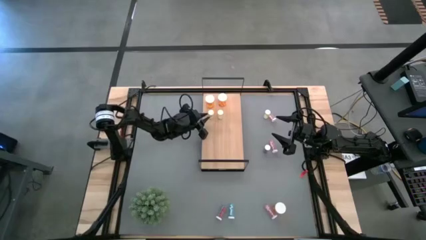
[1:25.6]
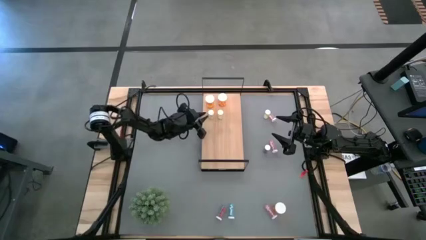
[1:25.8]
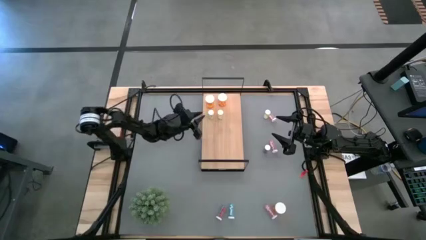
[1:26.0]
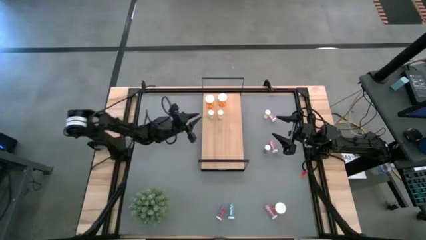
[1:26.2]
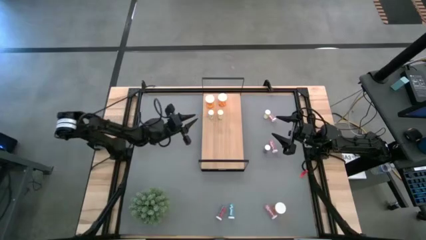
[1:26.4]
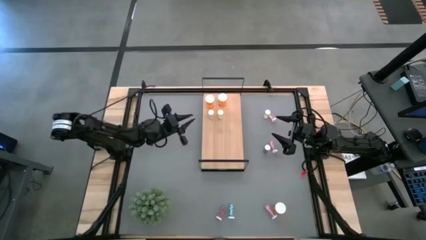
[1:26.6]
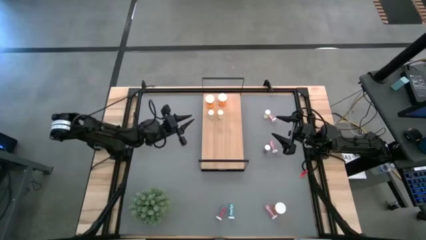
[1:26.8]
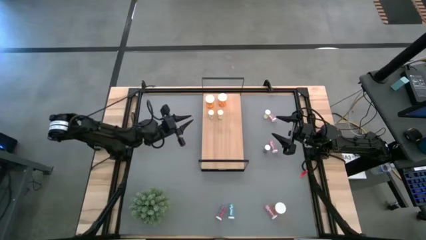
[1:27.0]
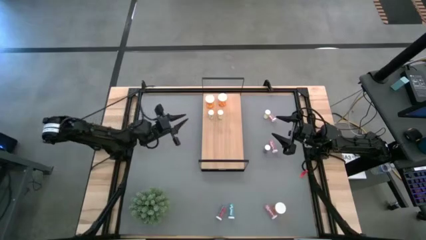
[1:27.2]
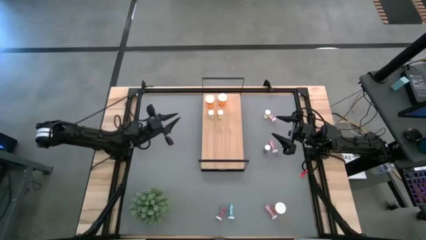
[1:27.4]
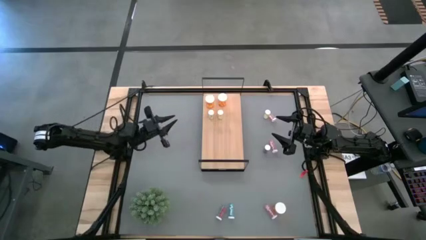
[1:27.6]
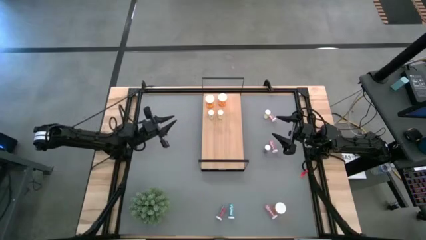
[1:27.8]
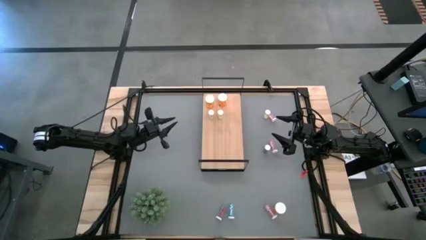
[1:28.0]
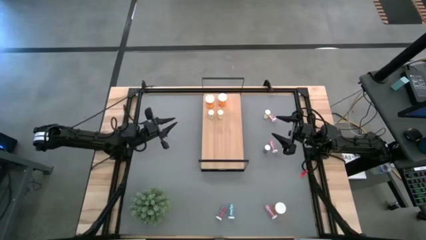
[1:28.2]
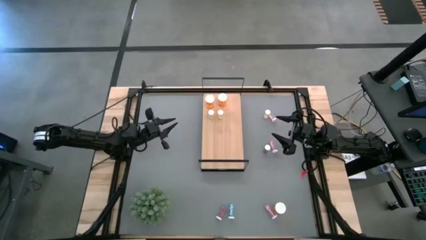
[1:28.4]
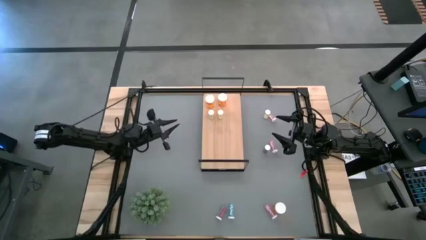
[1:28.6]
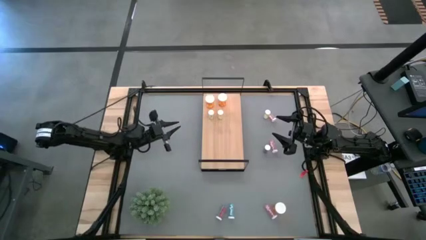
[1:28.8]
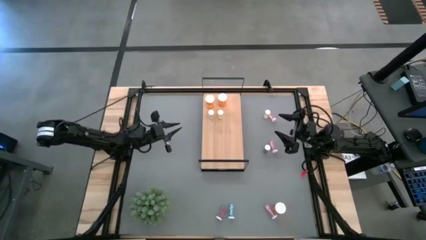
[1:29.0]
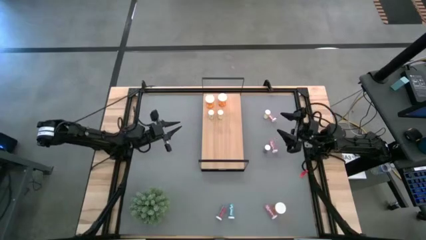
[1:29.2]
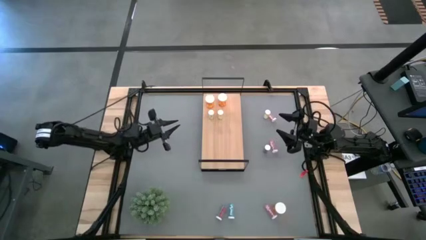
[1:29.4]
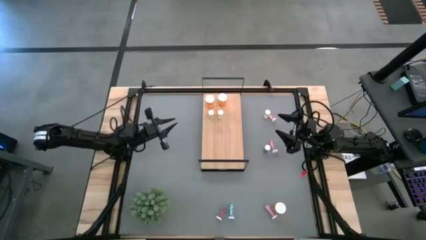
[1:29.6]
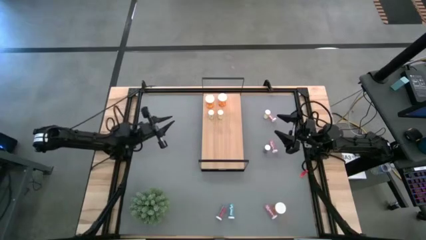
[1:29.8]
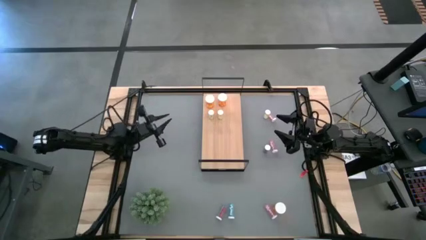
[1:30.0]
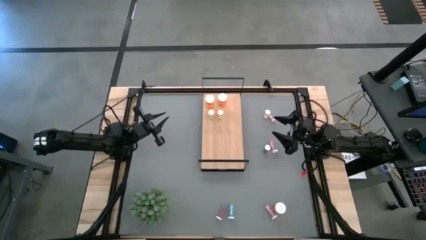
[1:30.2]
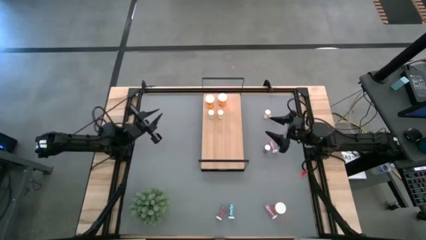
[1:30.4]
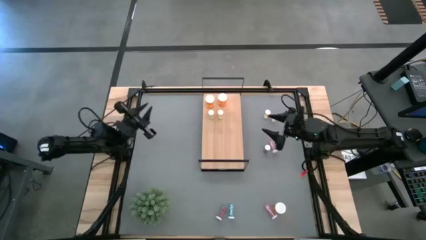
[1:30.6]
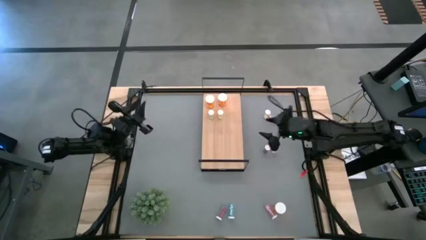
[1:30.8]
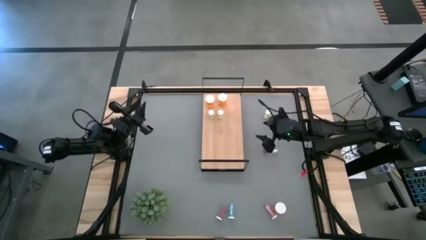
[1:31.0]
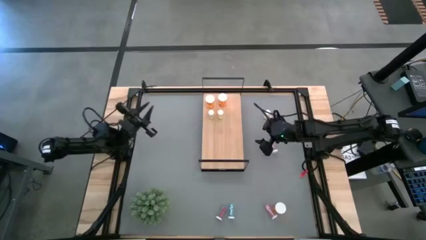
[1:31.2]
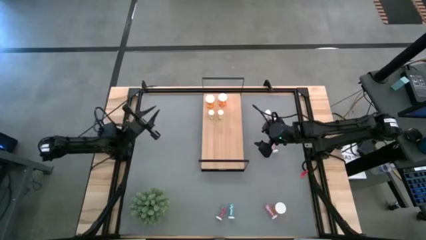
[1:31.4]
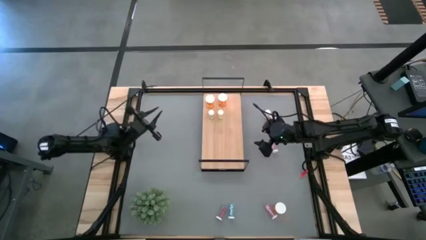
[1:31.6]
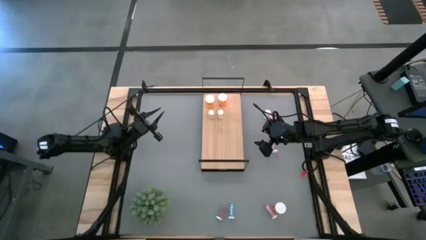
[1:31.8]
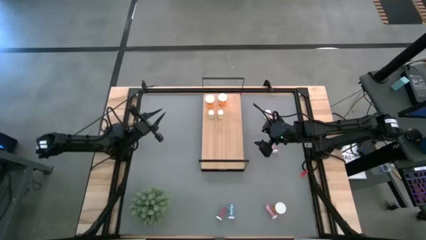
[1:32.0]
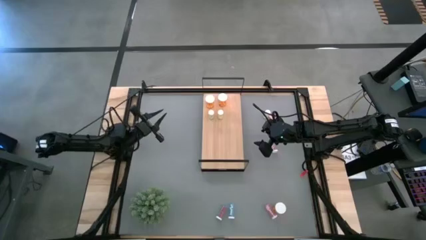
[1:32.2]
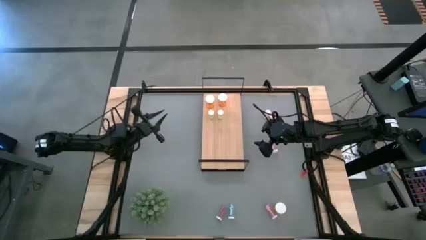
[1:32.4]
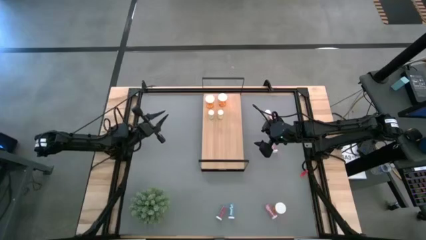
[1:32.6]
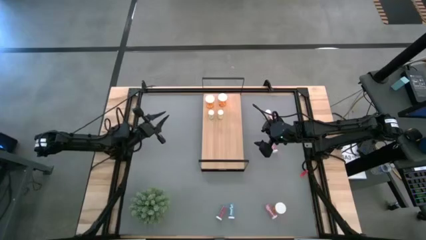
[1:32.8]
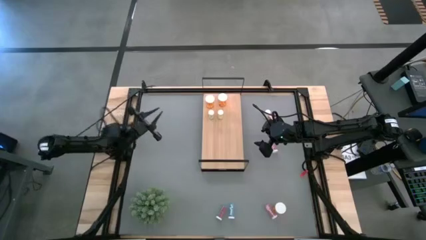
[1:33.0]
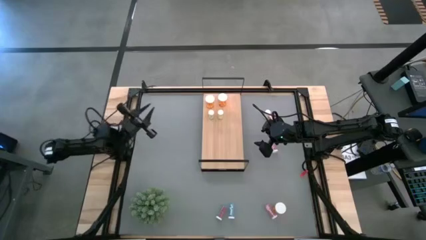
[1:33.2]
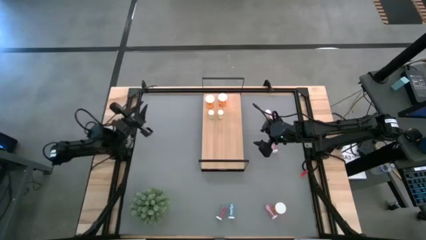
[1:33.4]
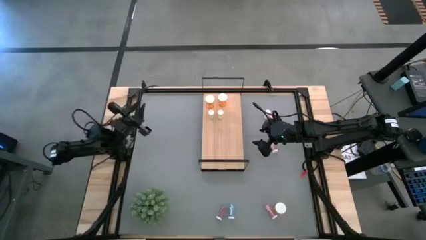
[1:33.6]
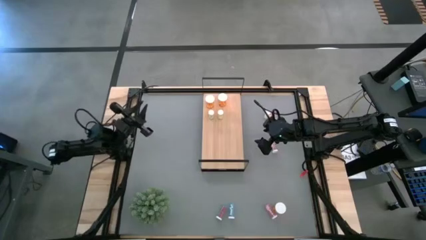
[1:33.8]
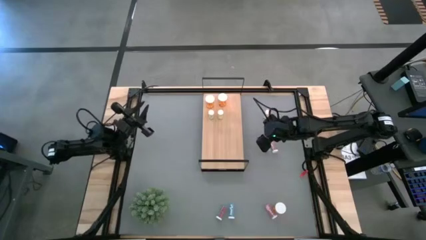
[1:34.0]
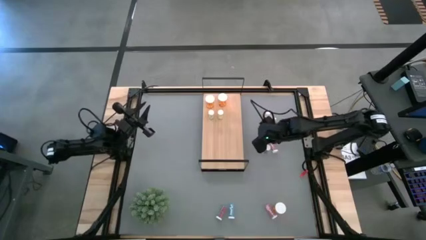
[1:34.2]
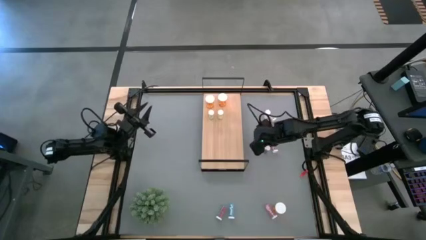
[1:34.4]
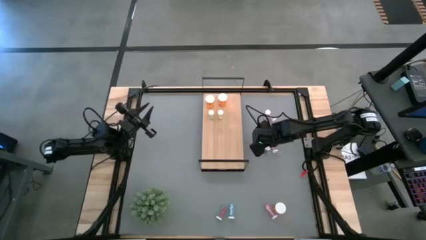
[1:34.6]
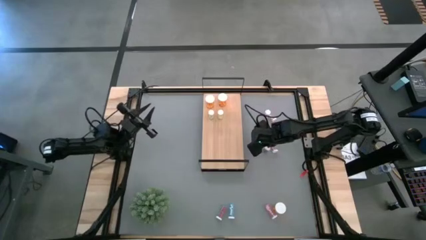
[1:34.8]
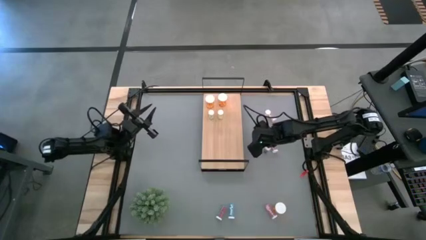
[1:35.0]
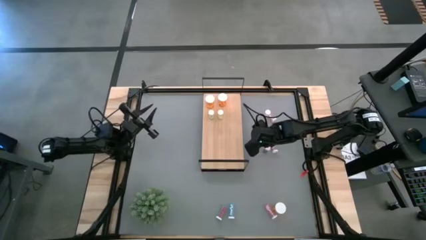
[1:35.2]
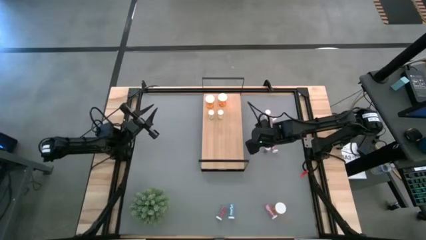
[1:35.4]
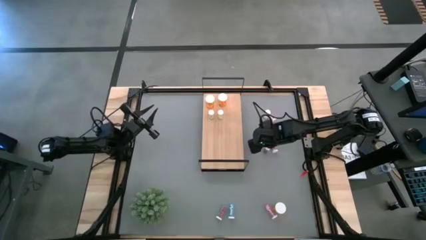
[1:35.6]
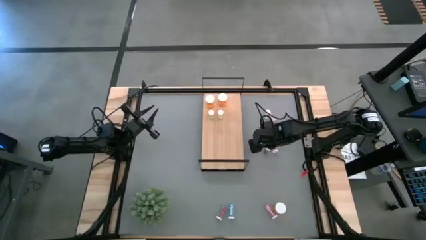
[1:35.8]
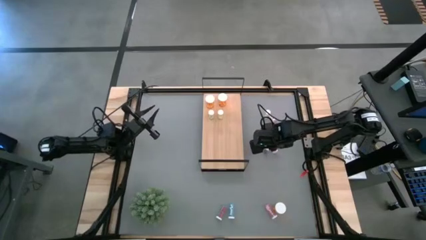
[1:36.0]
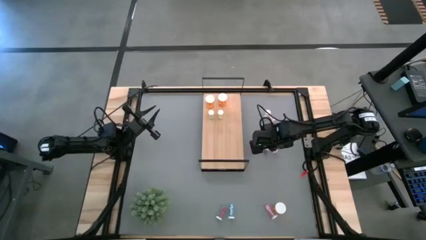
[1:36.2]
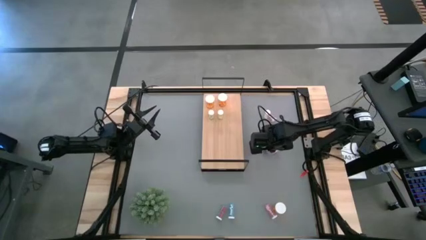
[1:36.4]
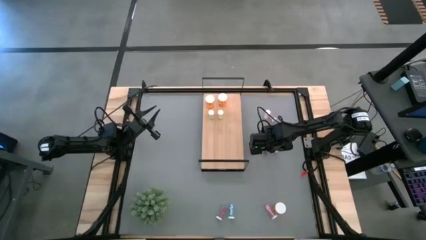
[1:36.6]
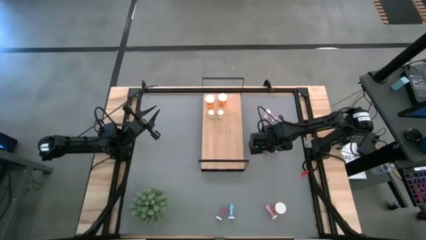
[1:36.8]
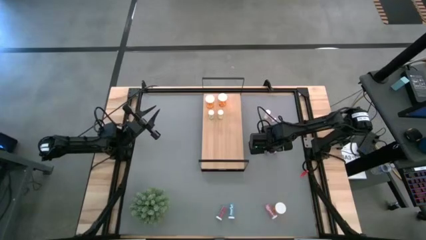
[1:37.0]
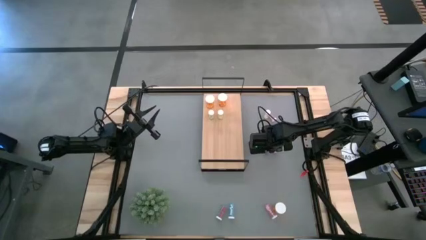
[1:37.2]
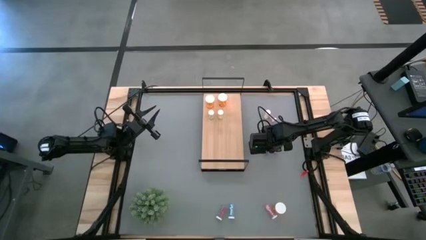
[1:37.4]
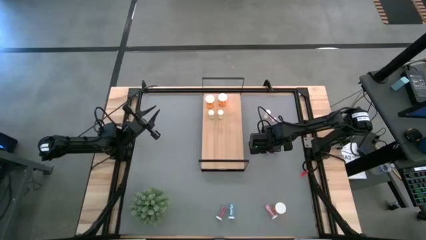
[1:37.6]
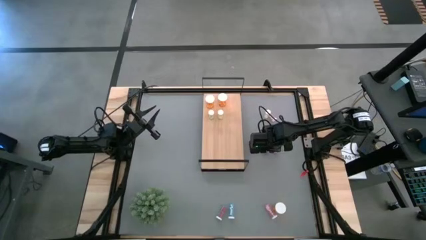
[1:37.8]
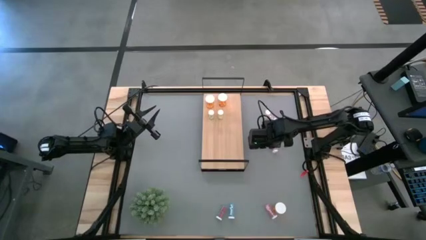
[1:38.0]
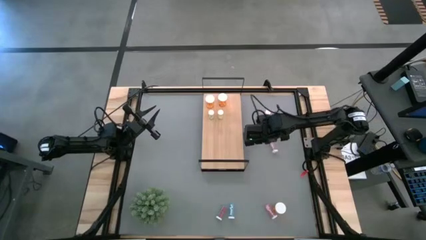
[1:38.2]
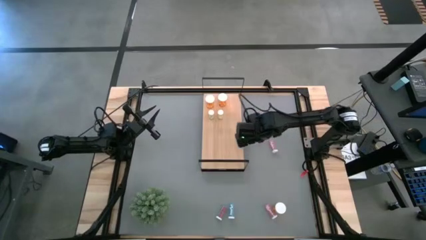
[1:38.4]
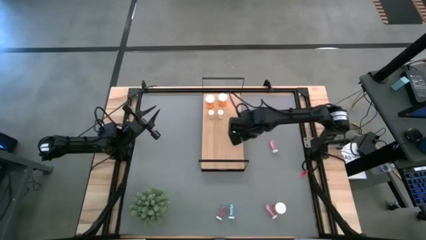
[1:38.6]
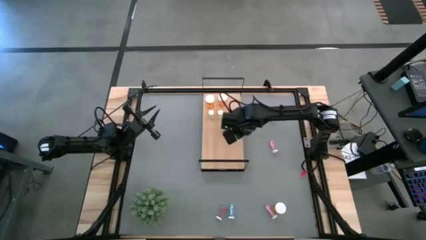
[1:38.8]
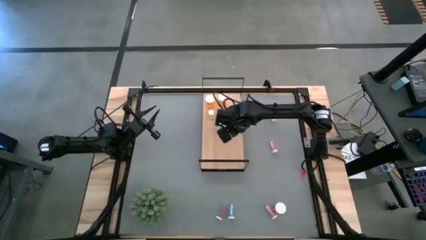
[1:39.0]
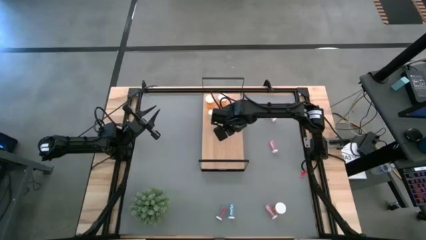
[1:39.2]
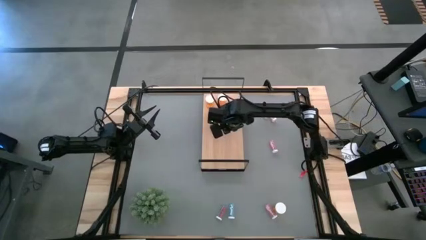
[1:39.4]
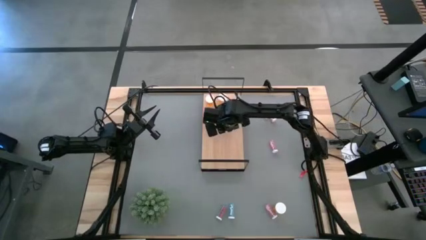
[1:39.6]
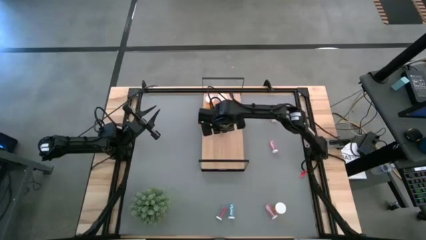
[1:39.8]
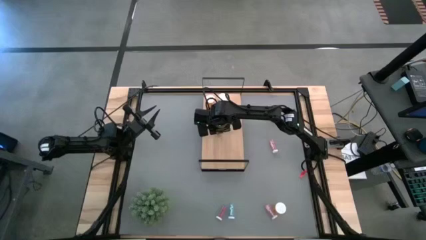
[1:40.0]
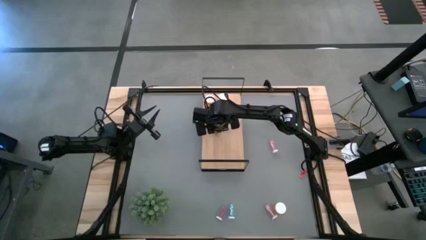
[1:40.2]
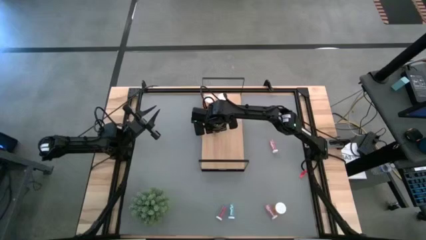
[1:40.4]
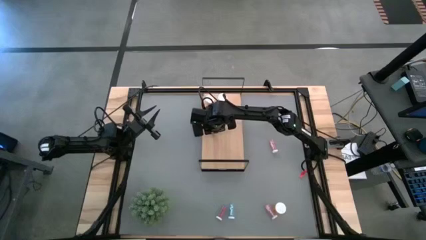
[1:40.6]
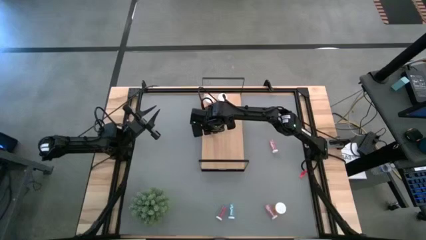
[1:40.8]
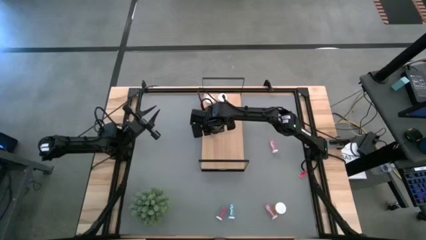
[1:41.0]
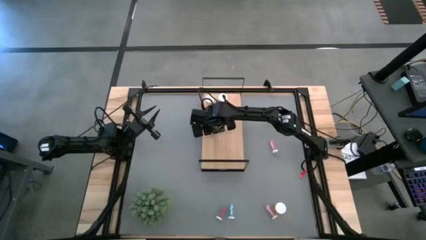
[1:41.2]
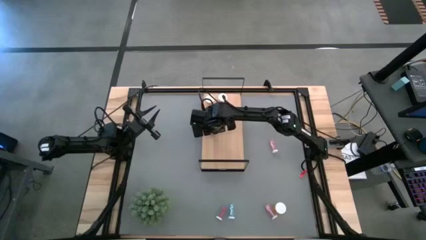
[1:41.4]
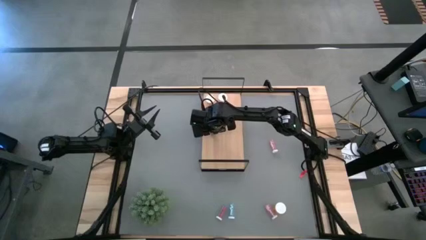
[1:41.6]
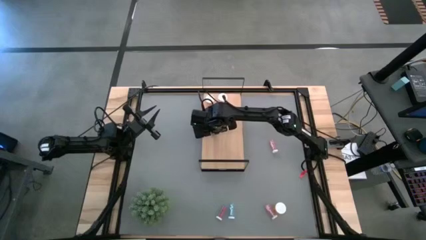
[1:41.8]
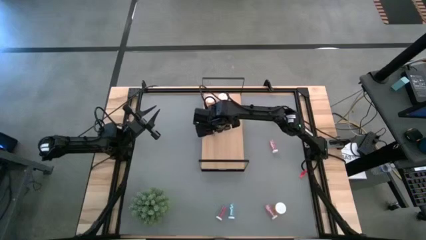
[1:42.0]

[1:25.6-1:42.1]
Task: Pick and place medicine bottles onto shelf by color
Put the top blue pill bottle on the shelf
